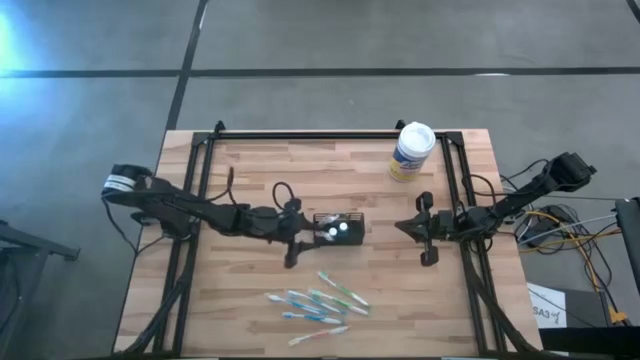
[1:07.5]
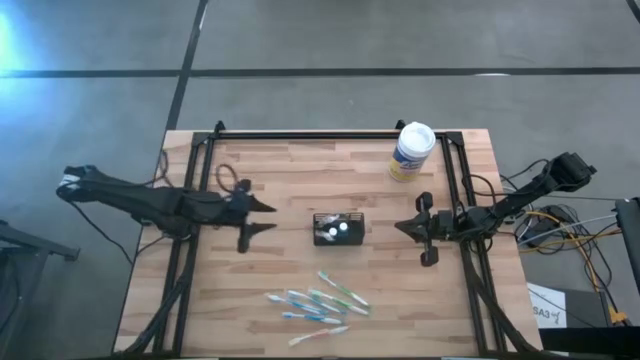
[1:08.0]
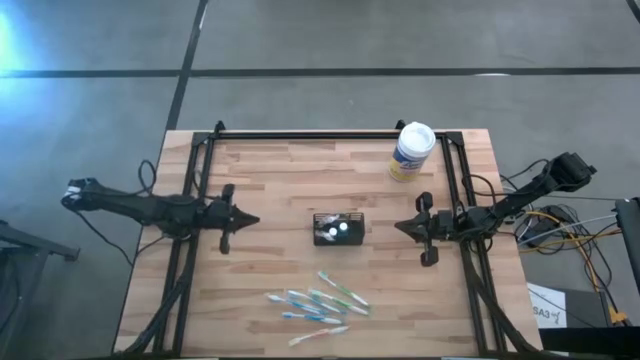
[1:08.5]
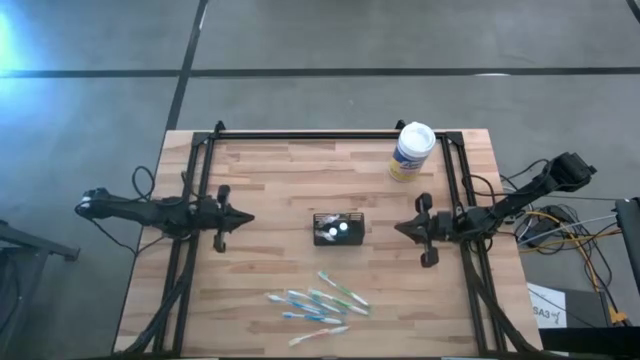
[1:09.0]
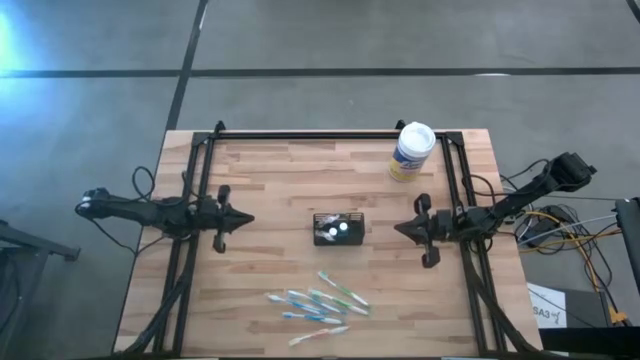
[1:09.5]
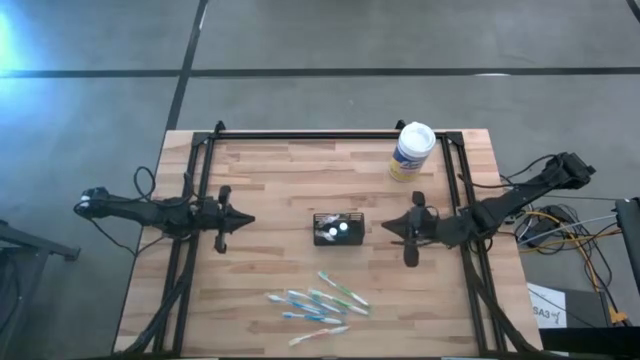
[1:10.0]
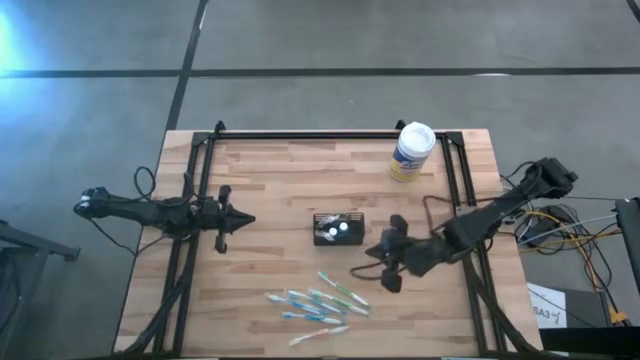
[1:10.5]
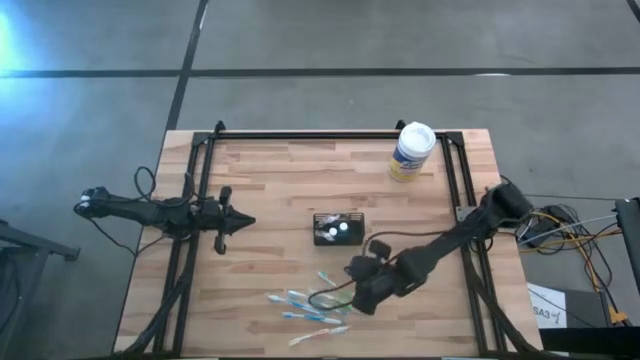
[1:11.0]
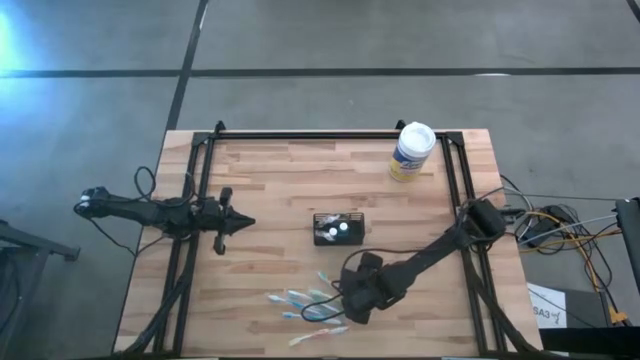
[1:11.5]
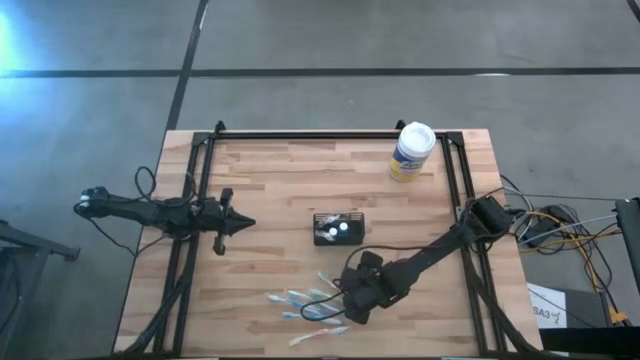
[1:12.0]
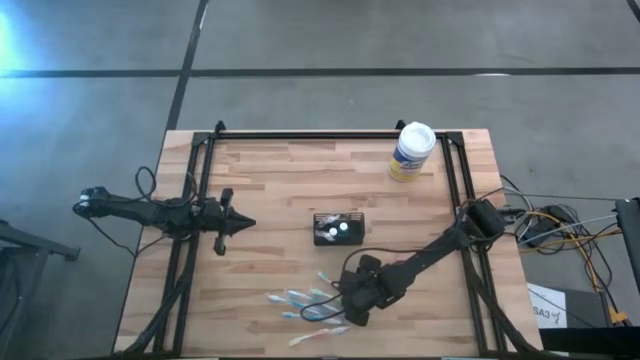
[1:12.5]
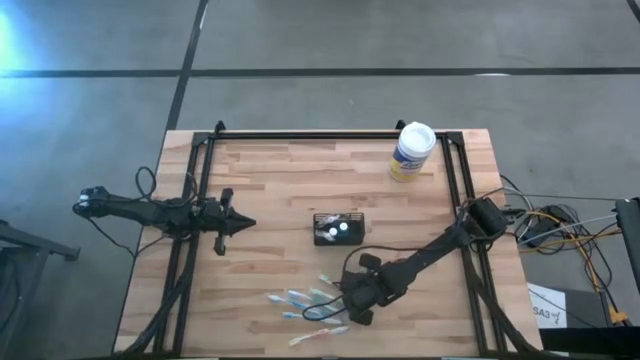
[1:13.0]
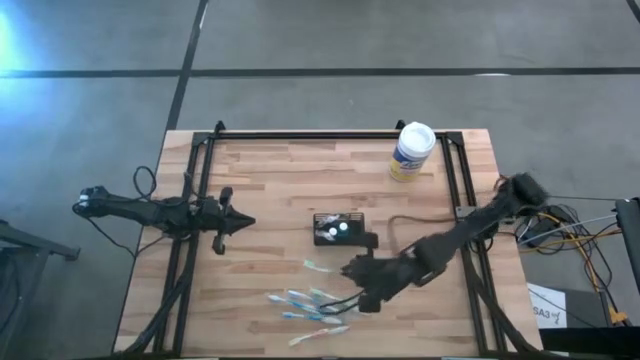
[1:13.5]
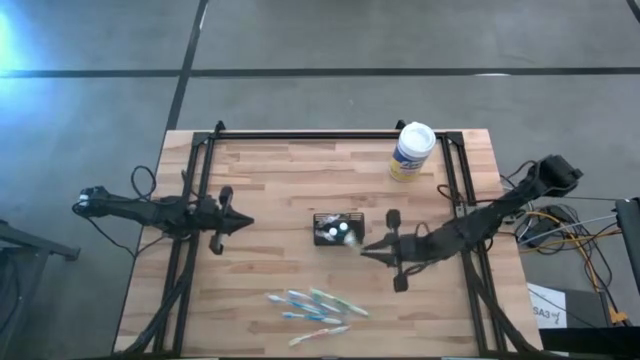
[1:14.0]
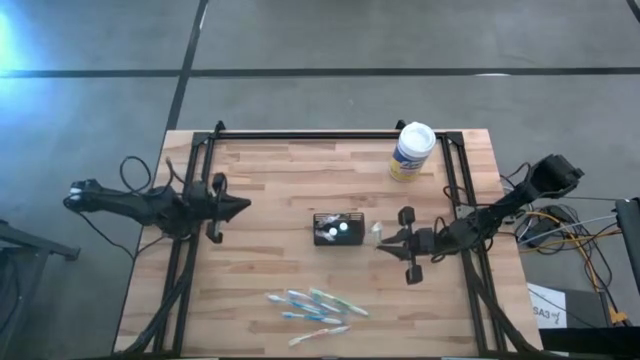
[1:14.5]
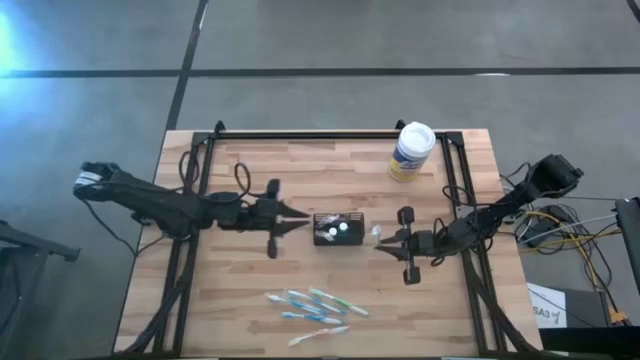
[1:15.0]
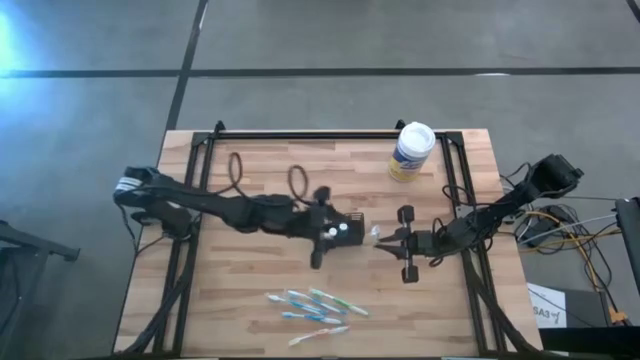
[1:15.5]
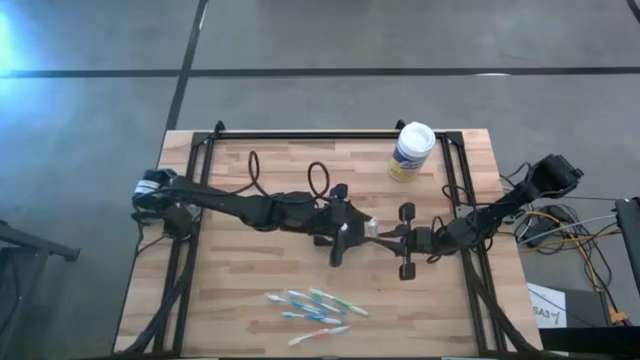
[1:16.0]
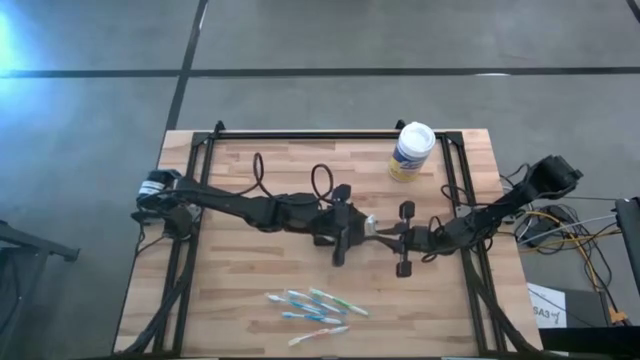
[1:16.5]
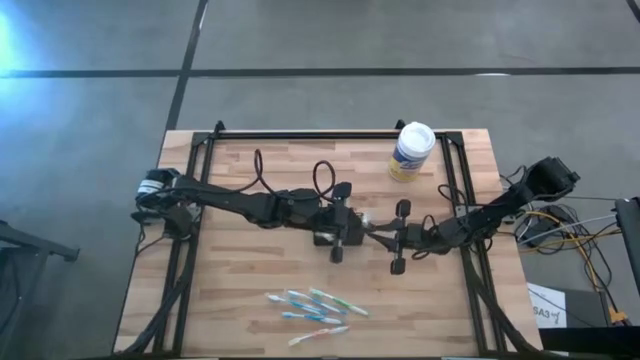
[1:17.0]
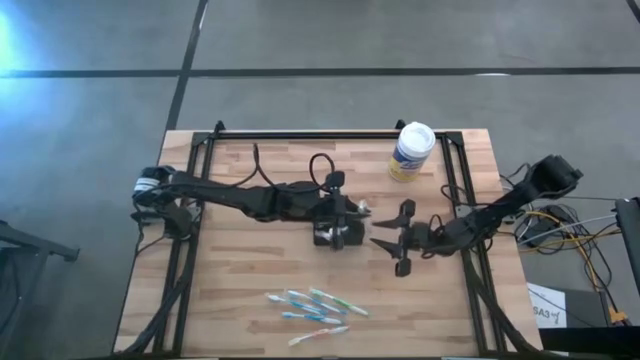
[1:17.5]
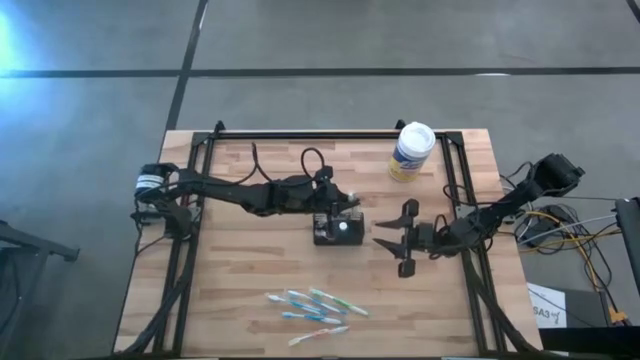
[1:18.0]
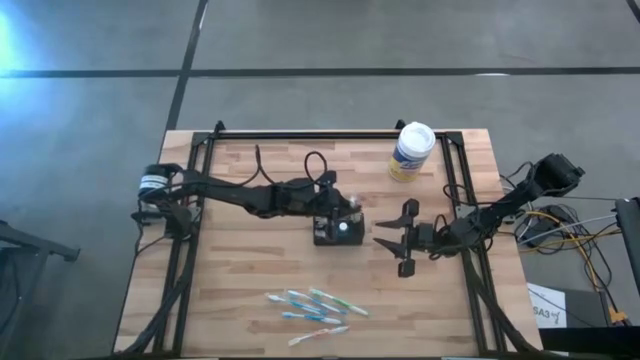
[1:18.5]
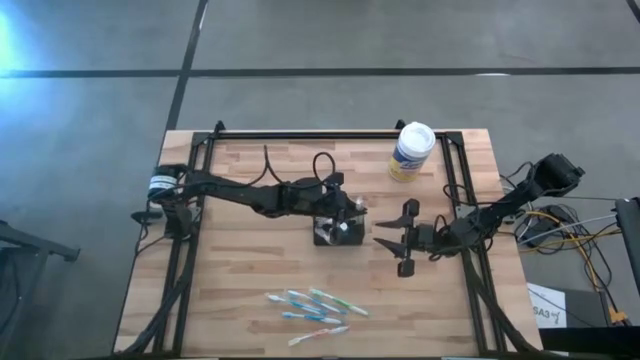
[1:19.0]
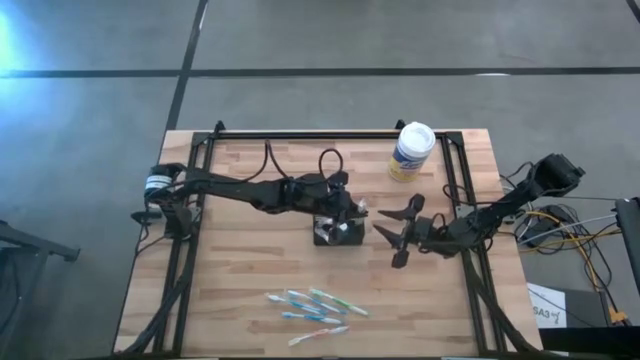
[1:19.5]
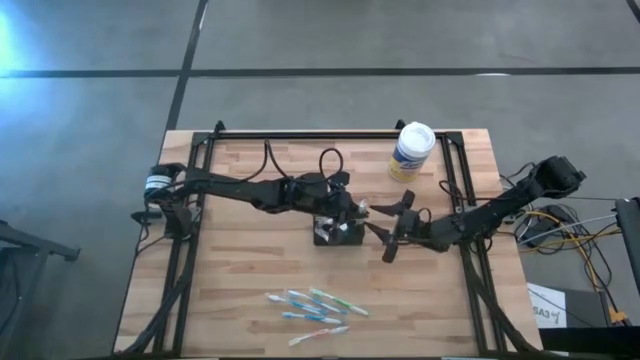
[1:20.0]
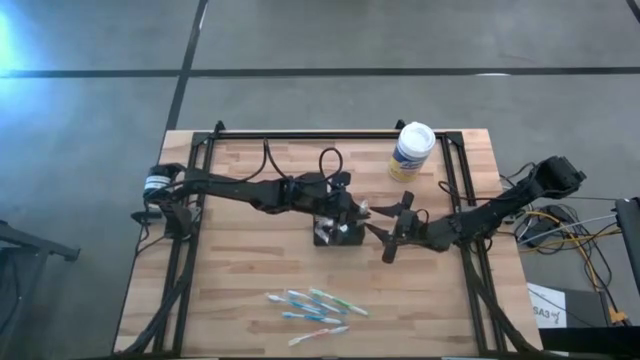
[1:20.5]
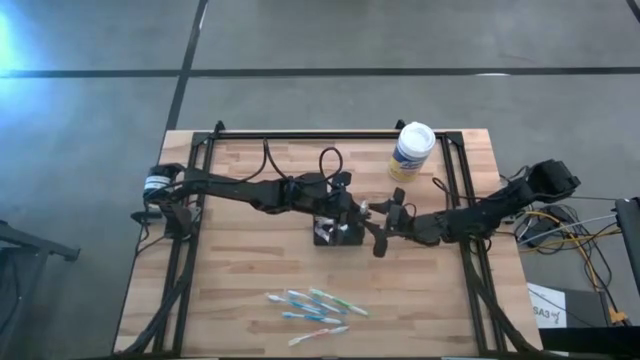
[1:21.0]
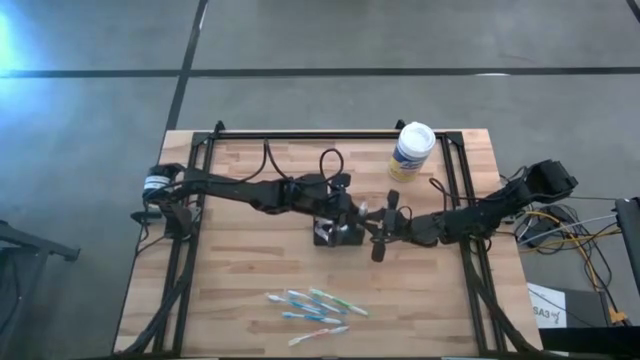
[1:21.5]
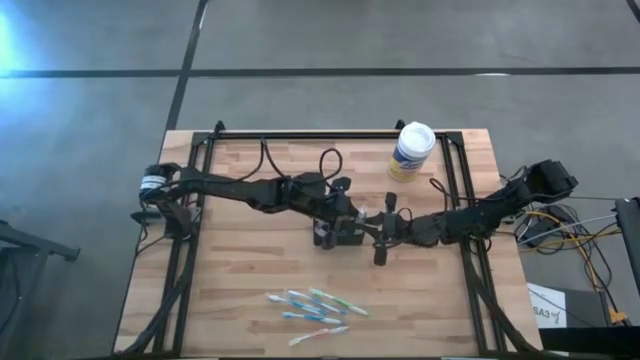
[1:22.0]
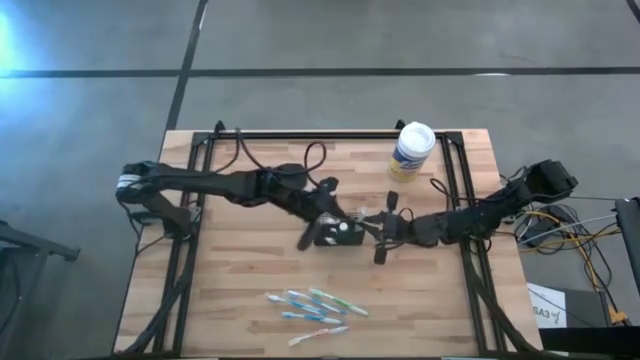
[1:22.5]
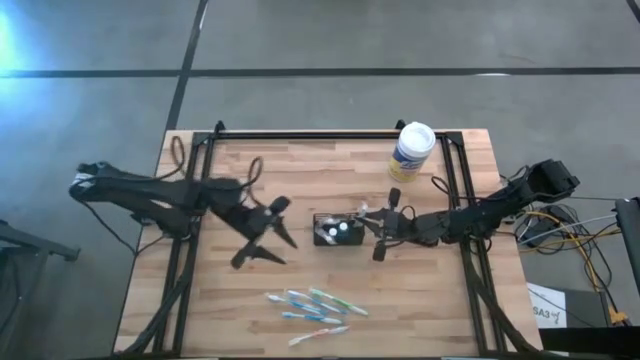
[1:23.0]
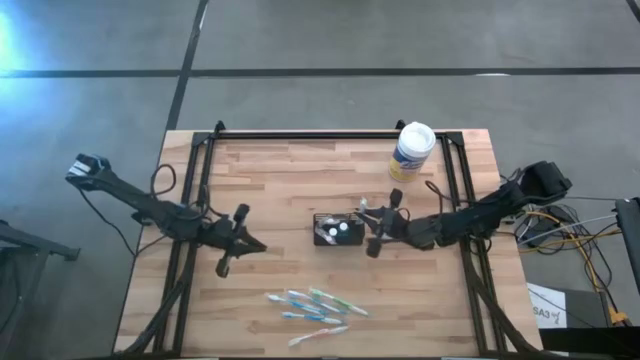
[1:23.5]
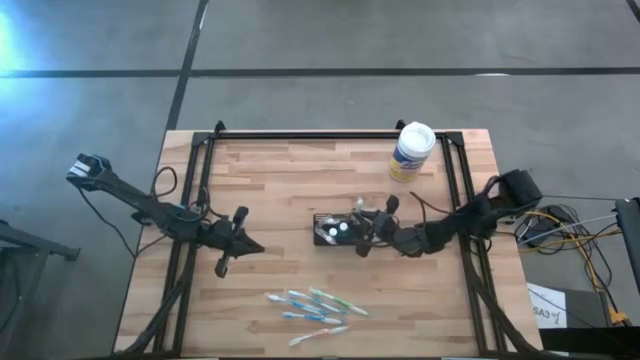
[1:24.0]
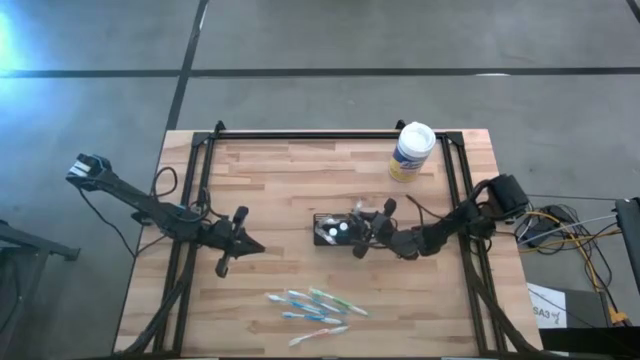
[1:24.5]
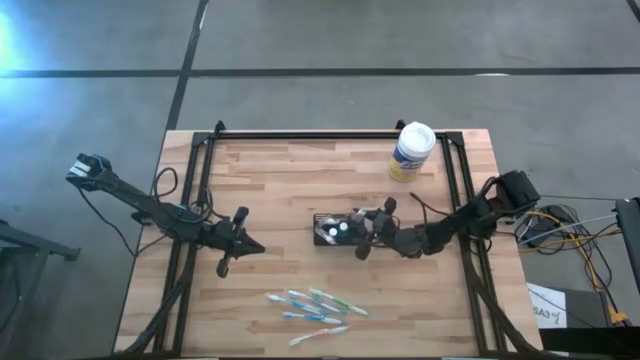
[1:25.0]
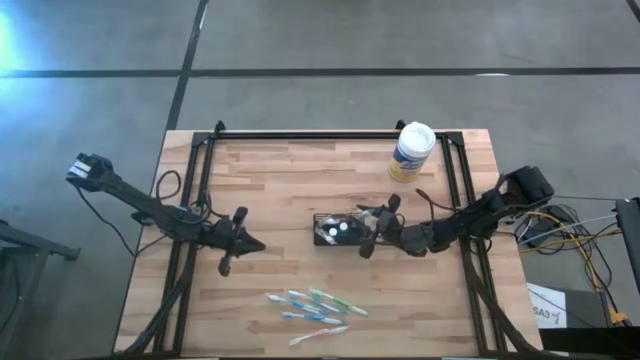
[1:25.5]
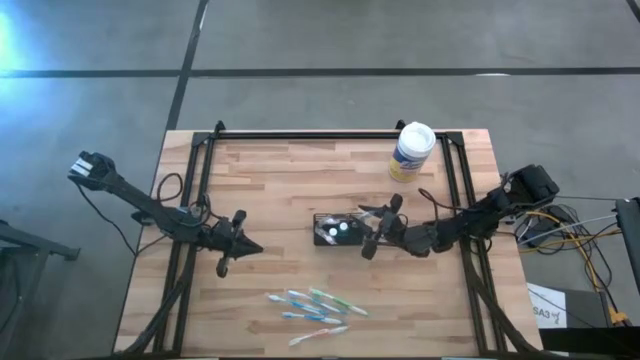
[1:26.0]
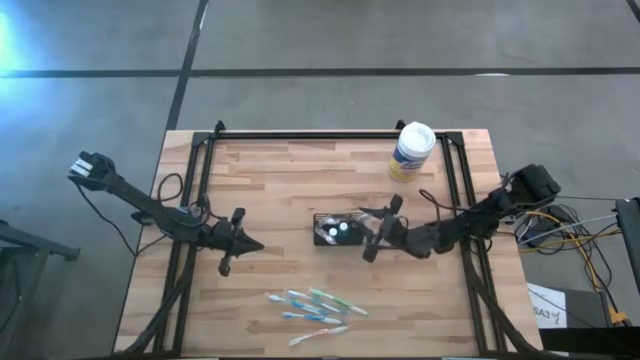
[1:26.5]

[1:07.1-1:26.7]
Task: Pick & Place toothbrushing station
Put the top green toothbrush into the mesh organizer

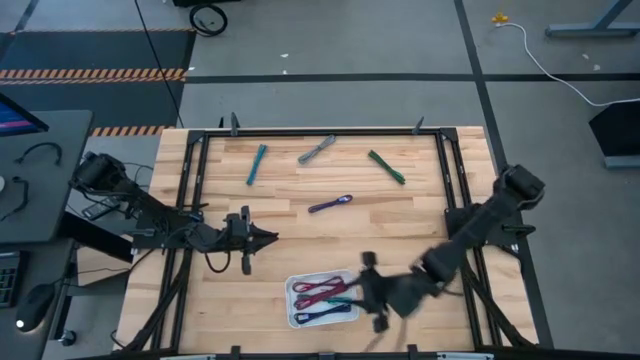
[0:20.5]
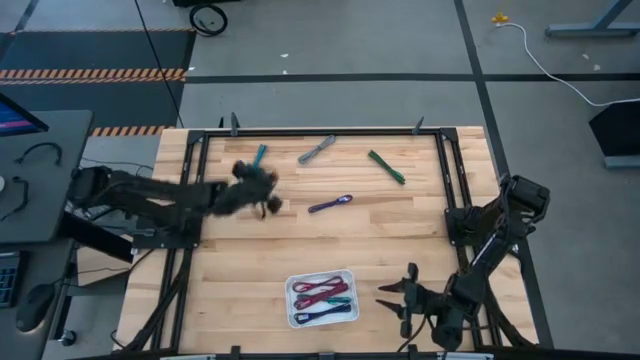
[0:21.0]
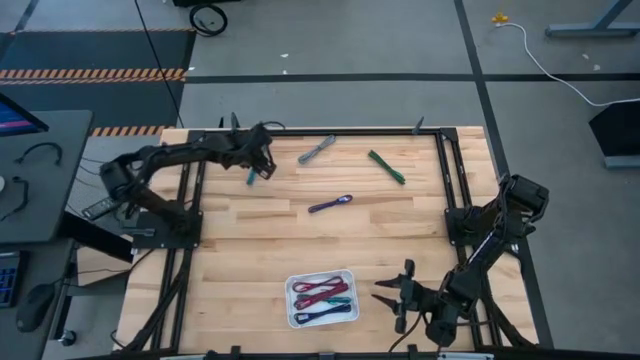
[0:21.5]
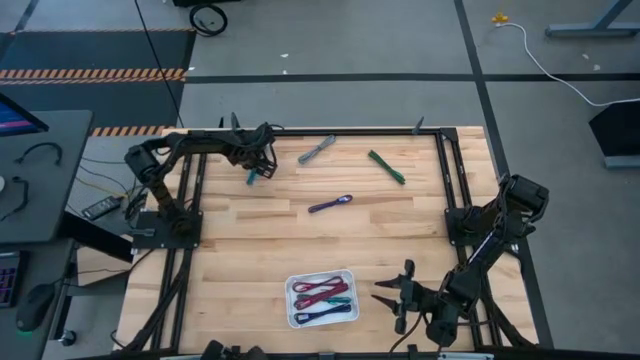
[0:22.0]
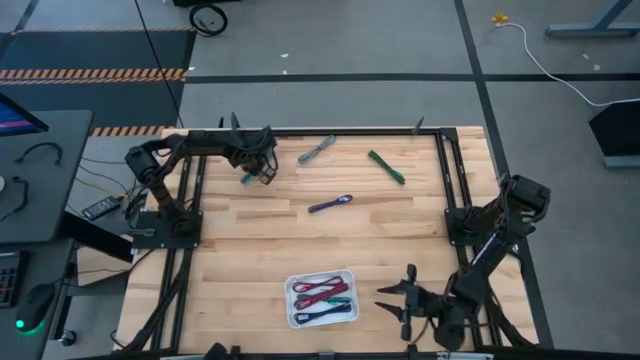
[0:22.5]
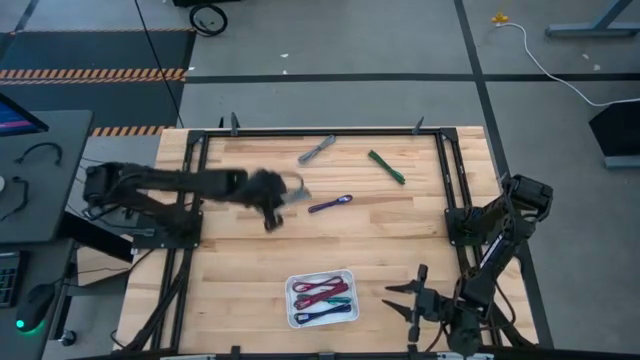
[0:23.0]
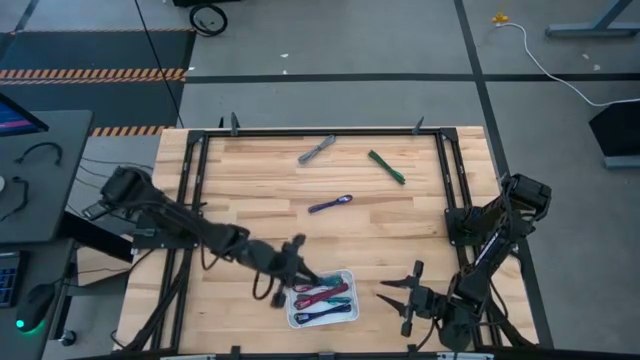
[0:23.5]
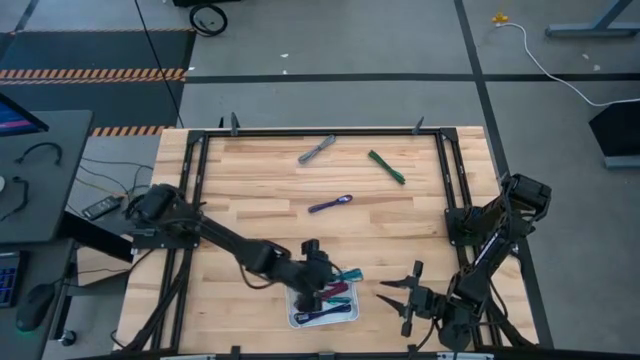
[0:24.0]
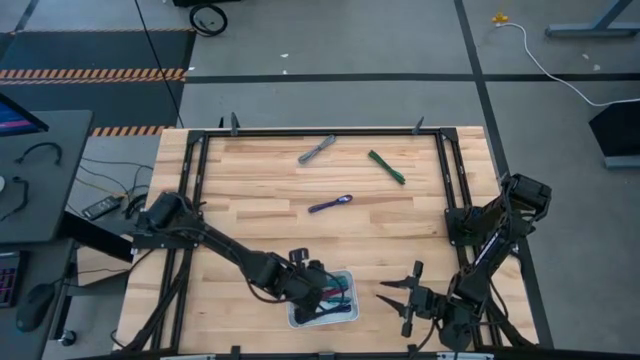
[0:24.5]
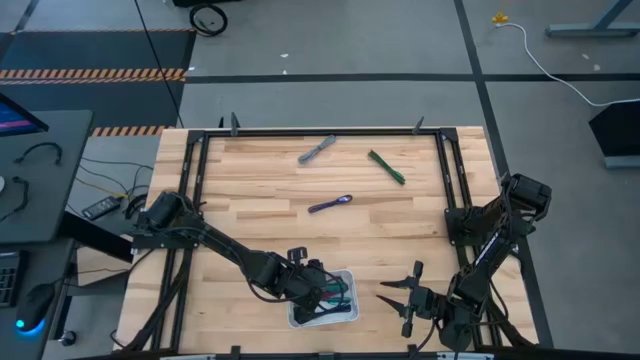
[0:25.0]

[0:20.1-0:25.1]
Task: Pick and place USB-C Cables
Put the light blue USB cable into the white bin
